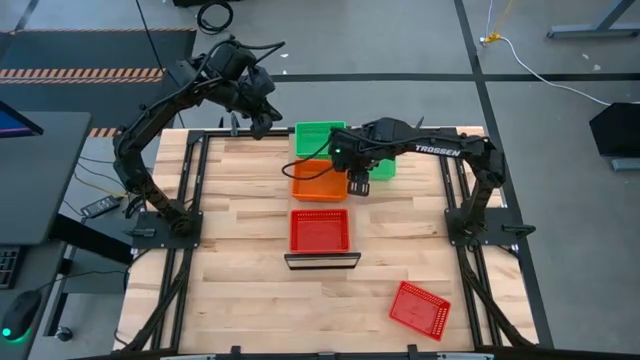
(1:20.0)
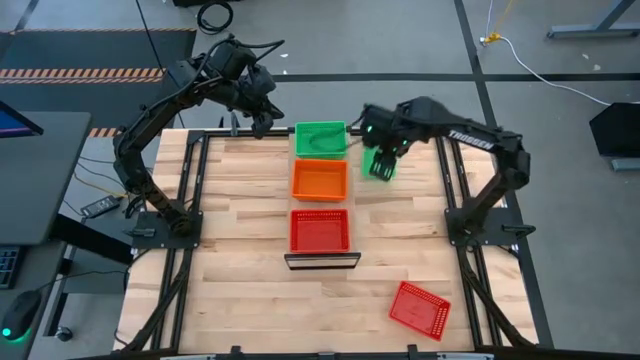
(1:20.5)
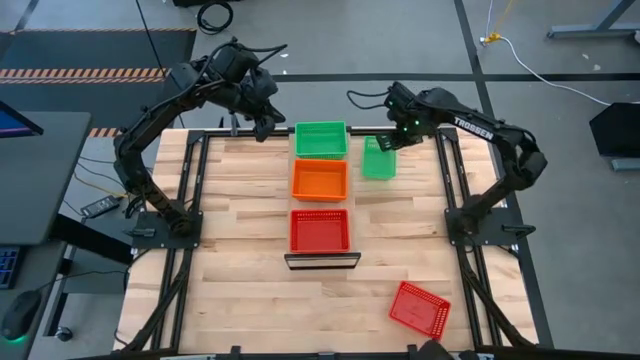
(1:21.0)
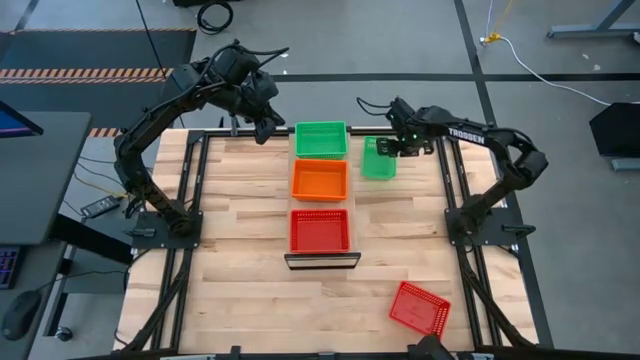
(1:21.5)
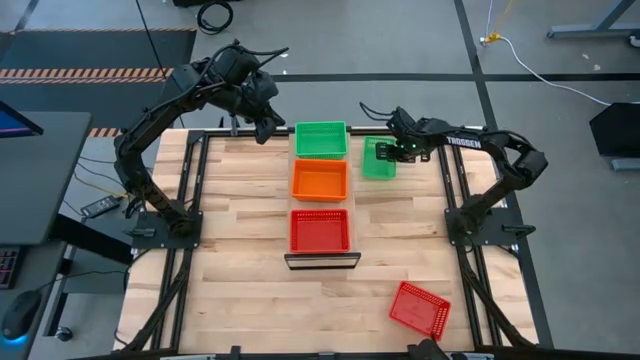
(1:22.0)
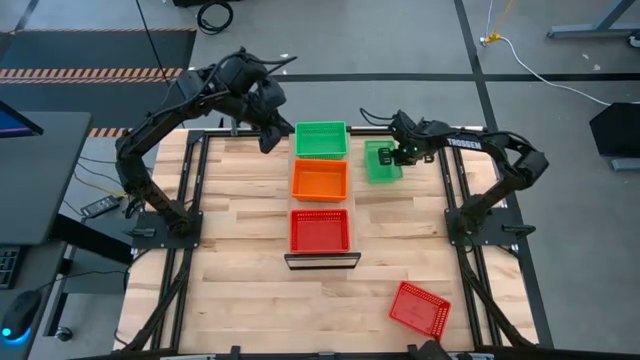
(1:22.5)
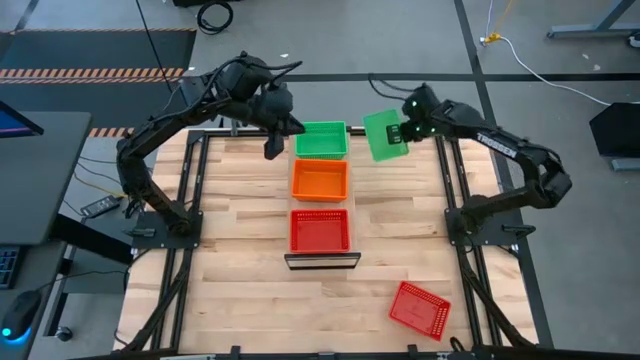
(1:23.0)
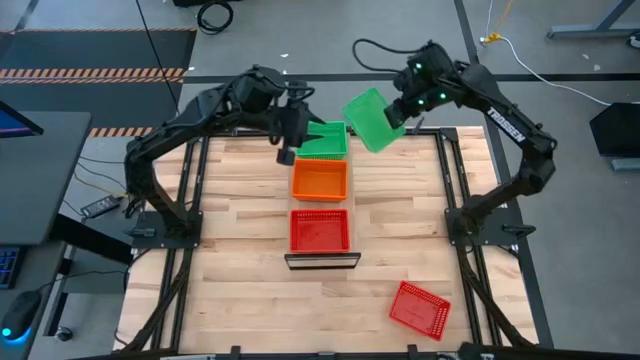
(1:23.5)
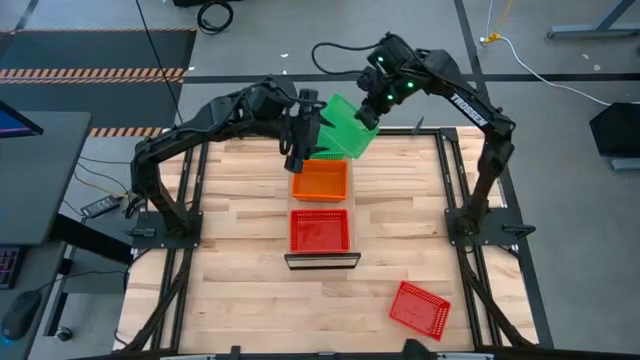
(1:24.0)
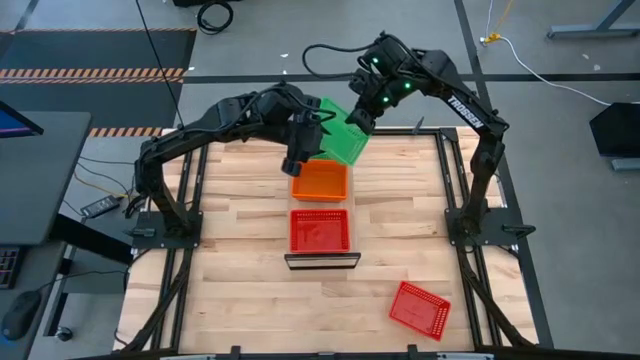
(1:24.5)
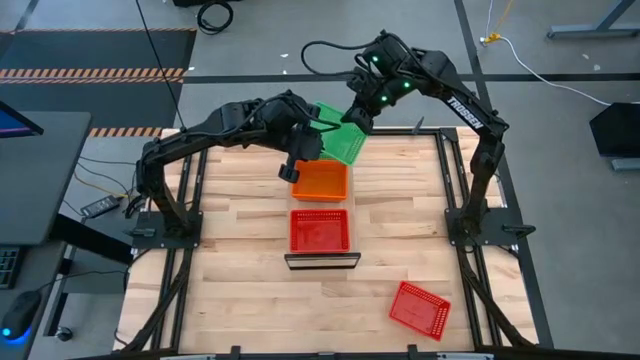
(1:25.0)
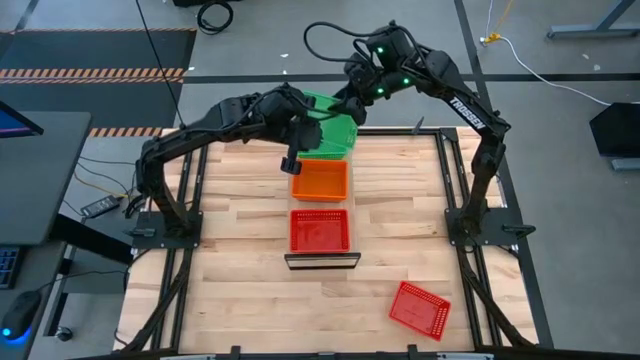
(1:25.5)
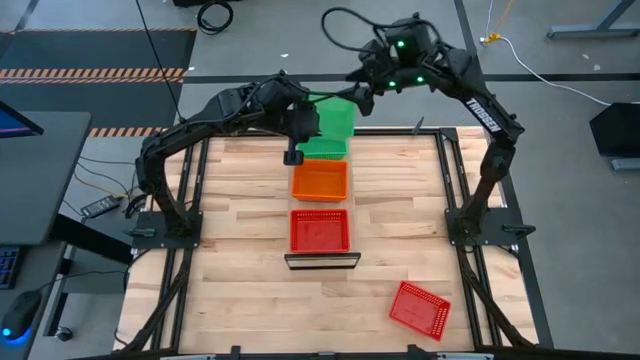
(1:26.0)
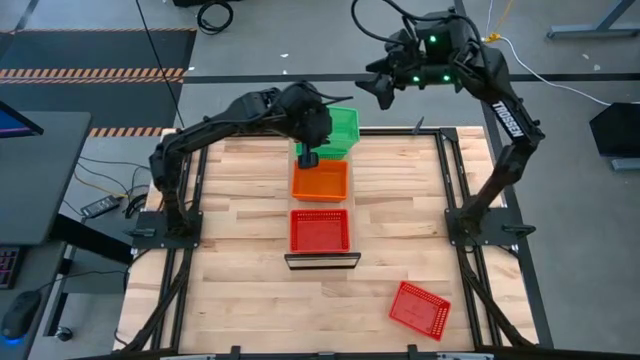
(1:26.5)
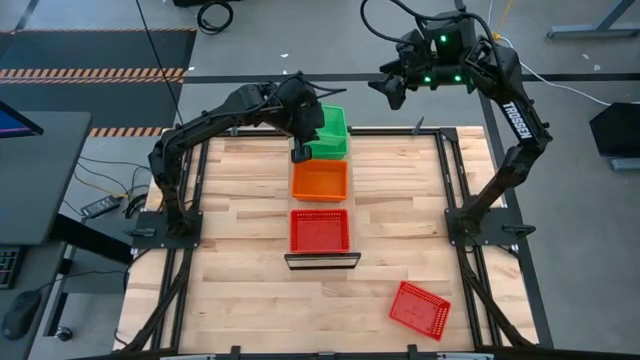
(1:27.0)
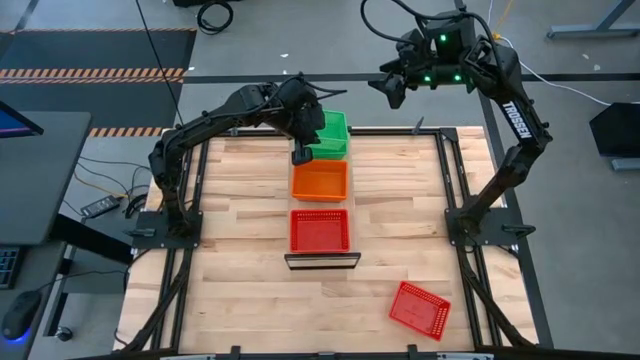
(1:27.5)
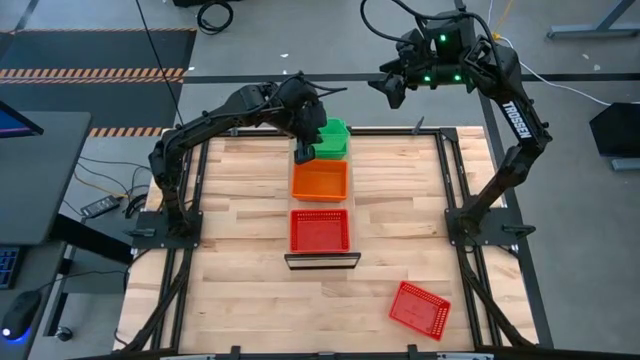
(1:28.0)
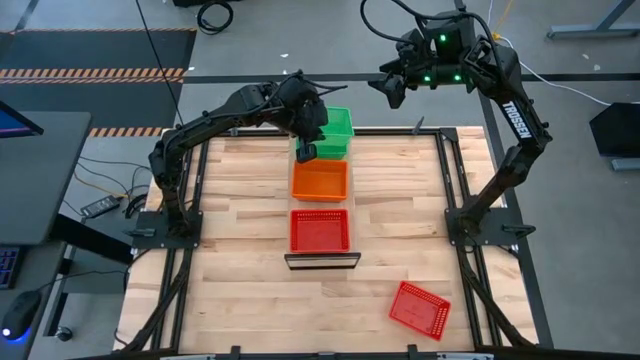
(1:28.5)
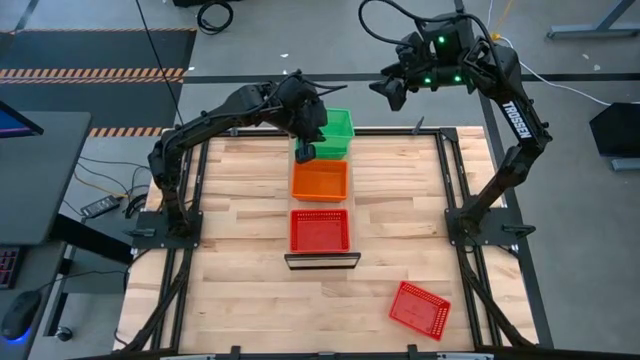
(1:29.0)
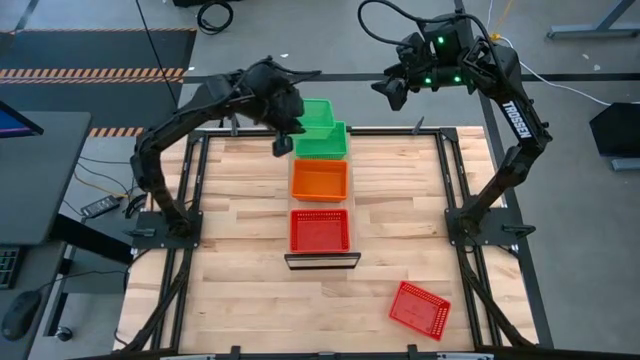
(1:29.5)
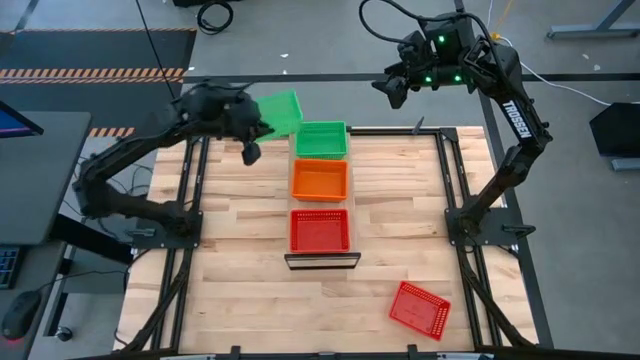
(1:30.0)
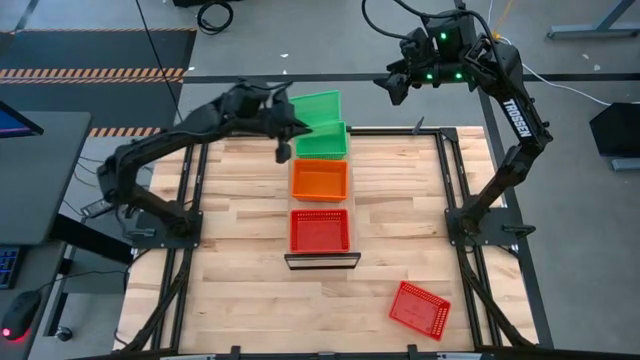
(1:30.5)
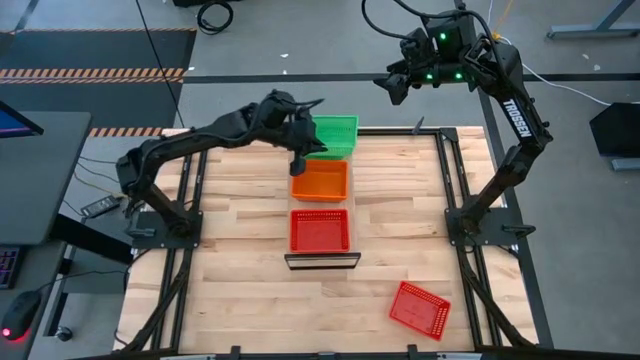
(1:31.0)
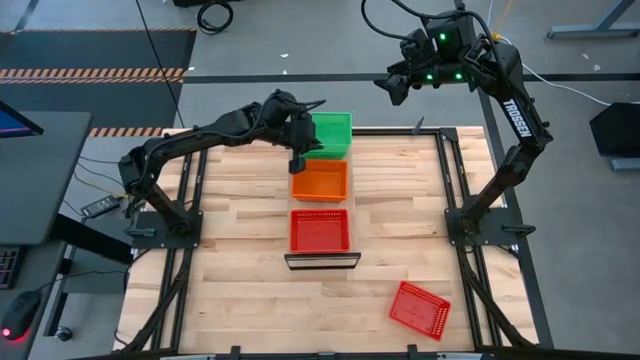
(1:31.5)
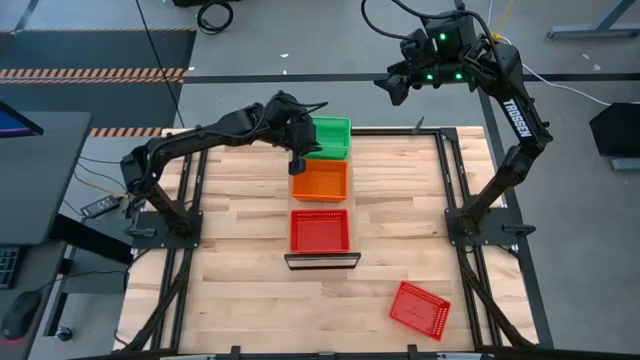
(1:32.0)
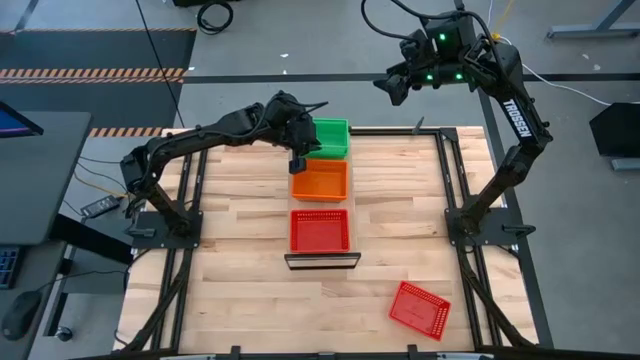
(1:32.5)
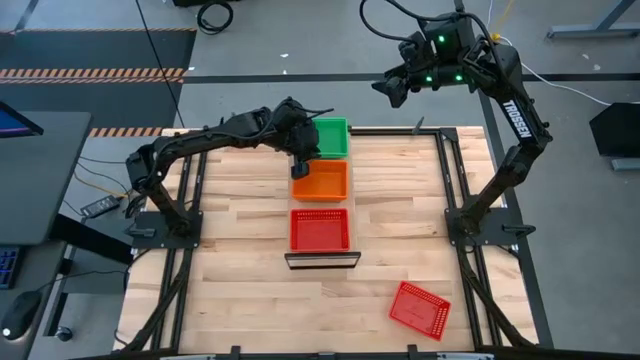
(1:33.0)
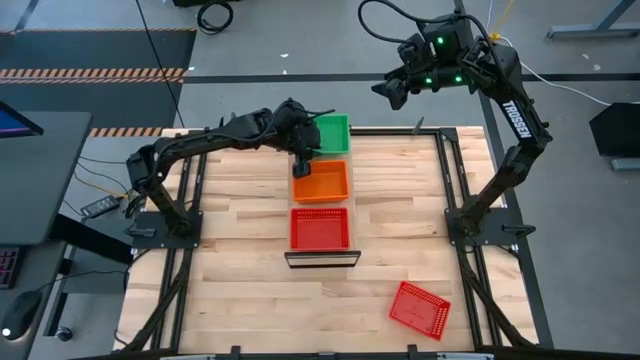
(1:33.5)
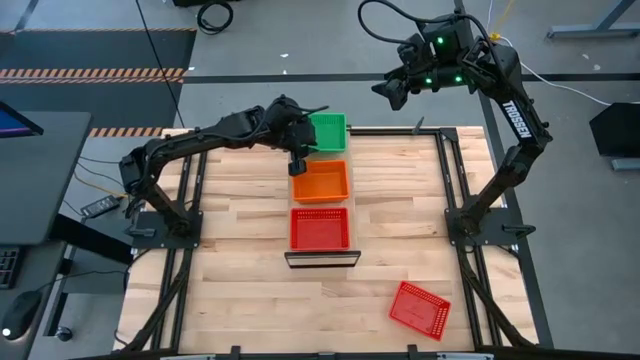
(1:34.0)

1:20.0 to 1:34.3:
Task: Stack baskets on shelf by color
Stack the green bin on top of the green bin on the shelf

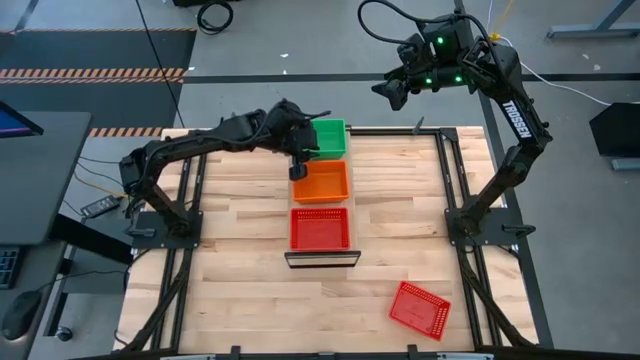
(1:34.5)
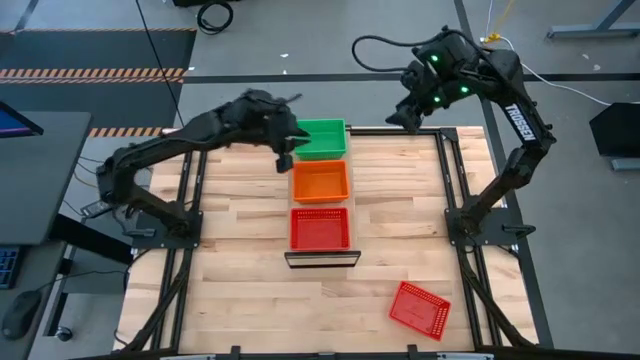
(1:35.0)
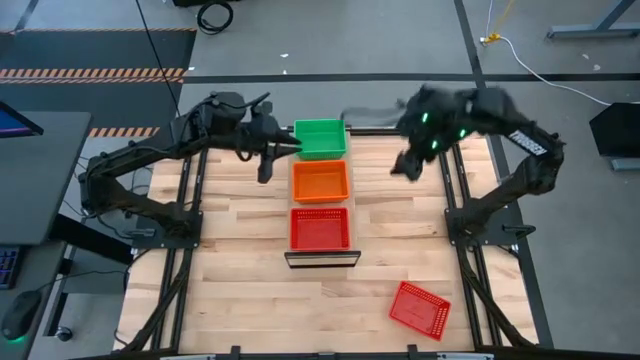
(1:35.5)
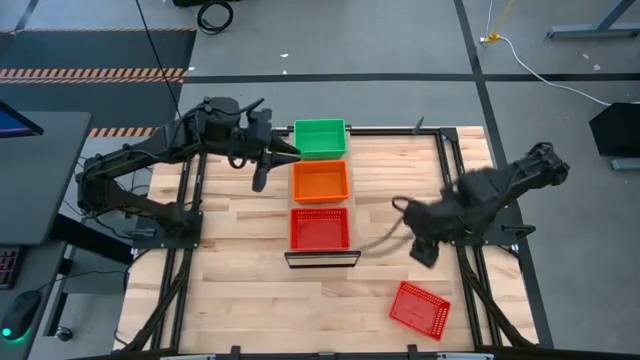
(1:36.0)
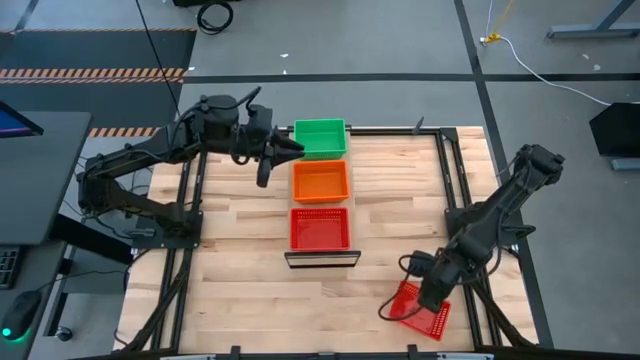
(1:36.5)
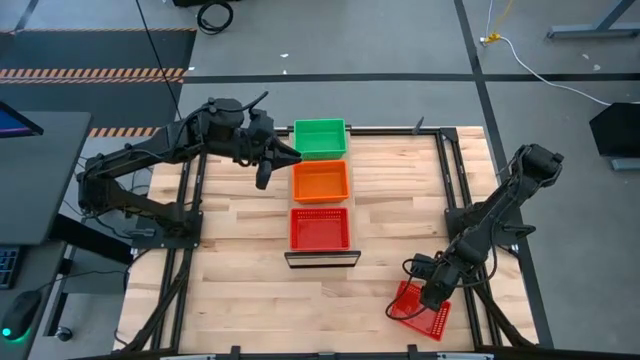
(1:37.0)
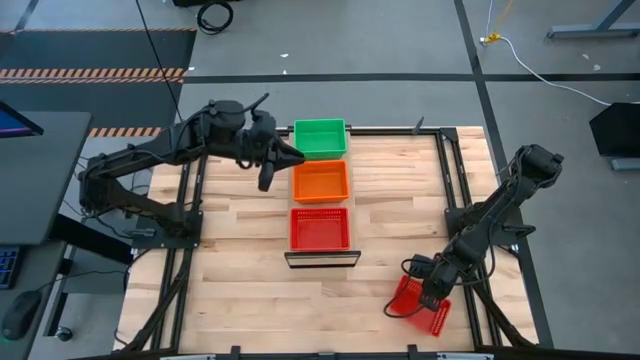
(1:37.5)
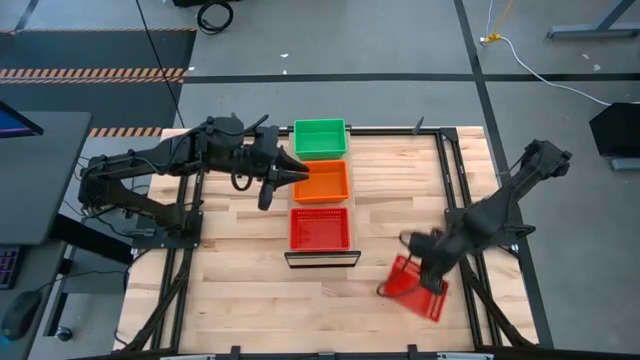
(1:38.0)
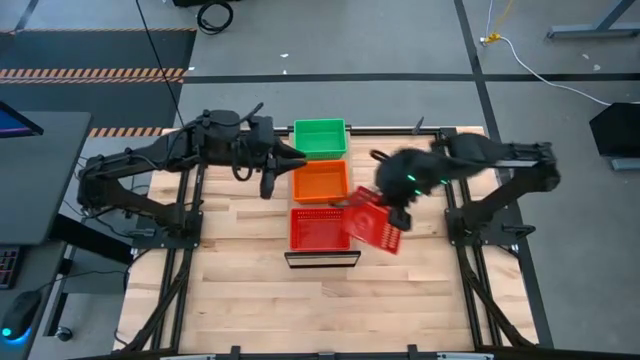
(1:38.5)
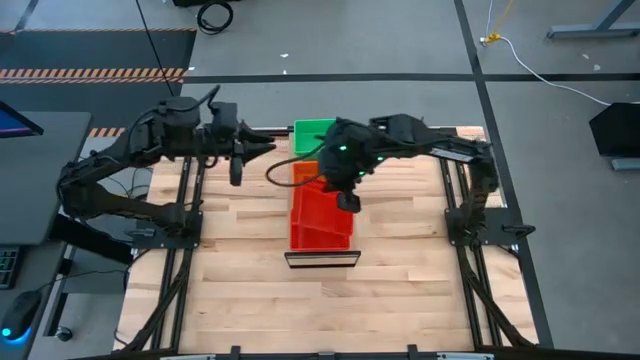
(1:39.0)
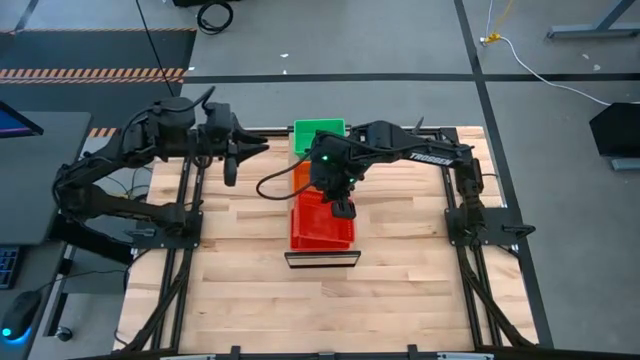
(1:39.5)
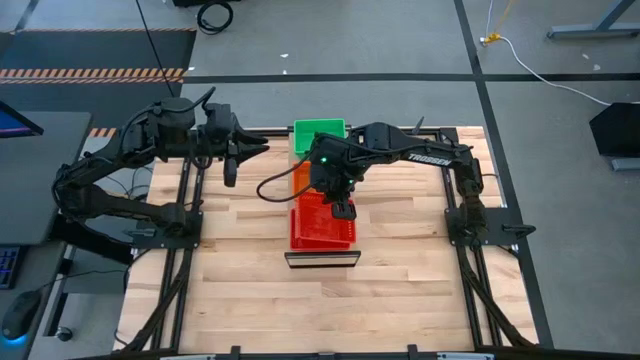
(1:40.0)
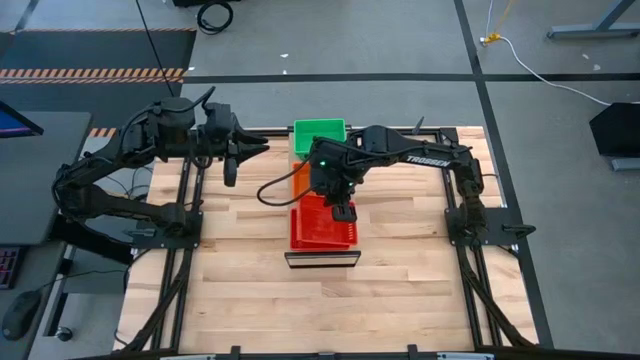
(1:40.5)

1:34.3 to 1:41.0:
Stack the red bin on top of the red bin on the shelf
